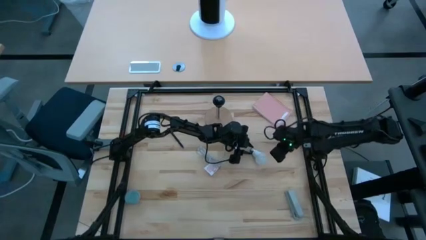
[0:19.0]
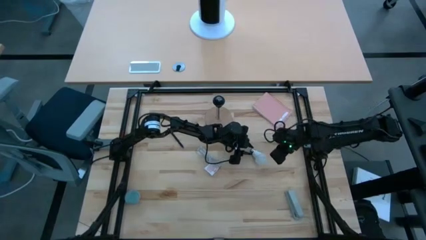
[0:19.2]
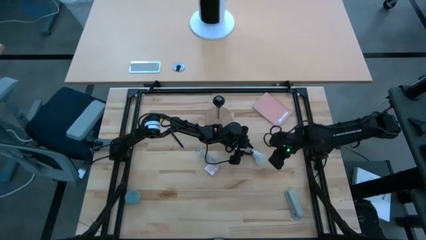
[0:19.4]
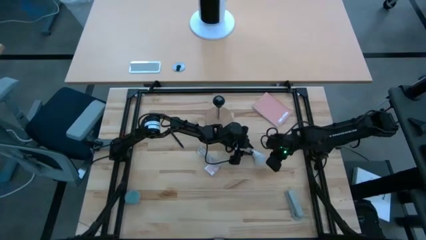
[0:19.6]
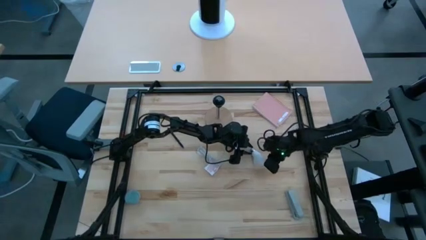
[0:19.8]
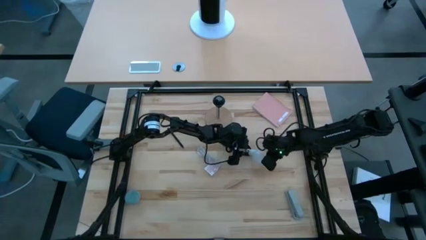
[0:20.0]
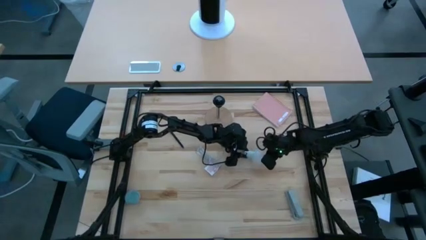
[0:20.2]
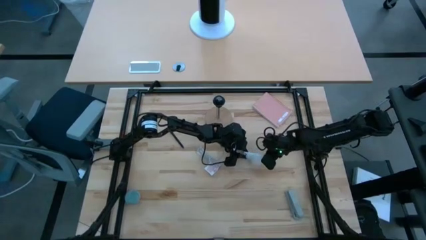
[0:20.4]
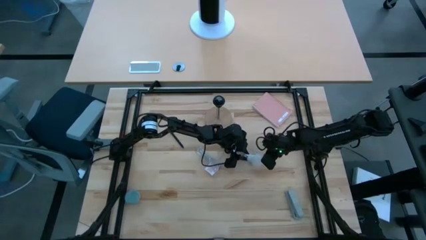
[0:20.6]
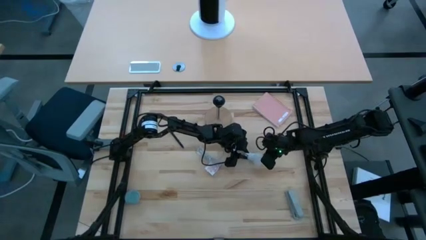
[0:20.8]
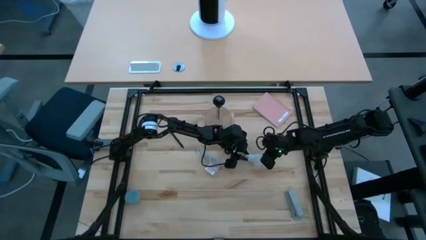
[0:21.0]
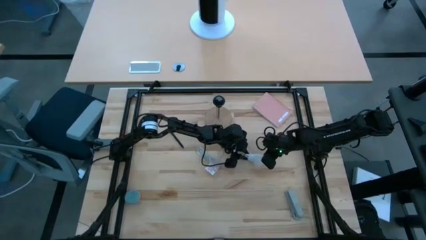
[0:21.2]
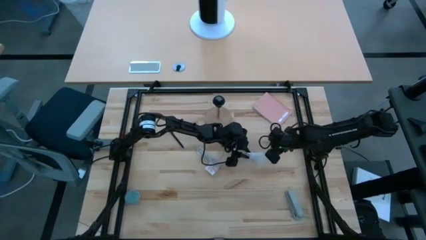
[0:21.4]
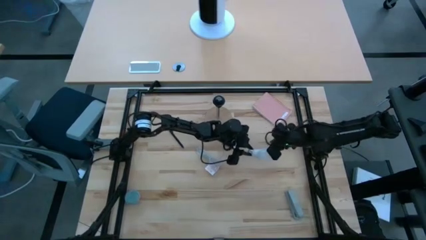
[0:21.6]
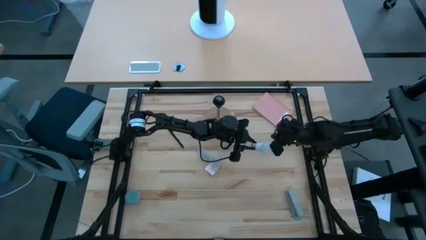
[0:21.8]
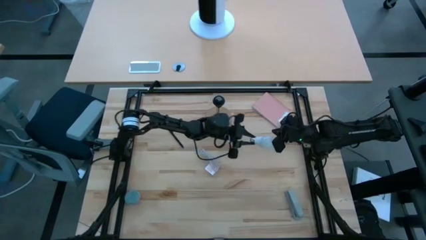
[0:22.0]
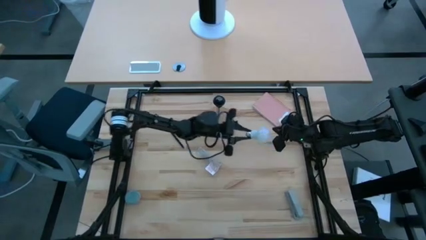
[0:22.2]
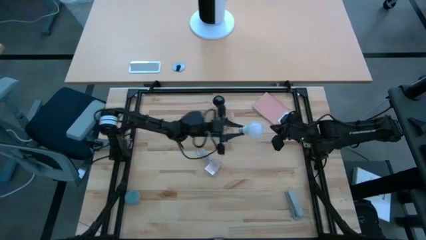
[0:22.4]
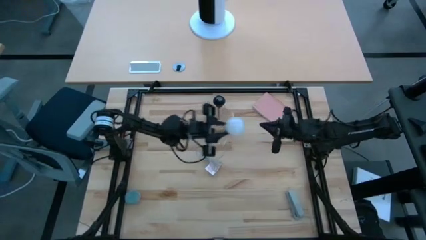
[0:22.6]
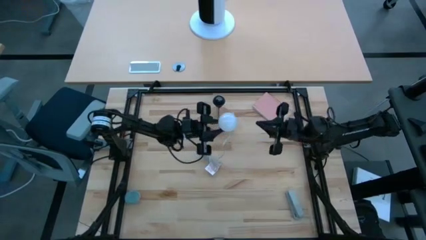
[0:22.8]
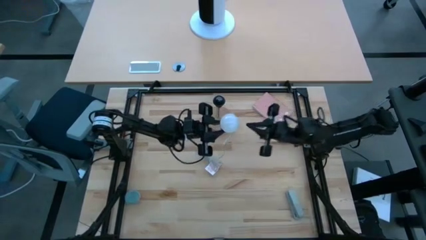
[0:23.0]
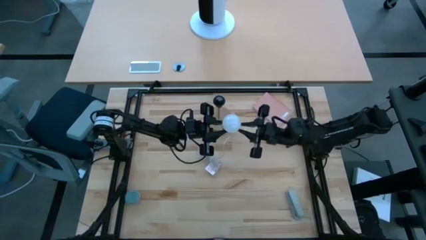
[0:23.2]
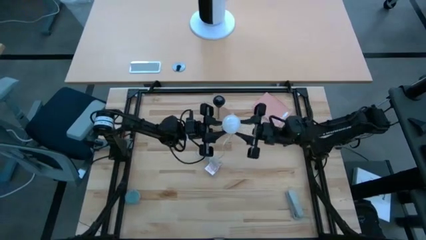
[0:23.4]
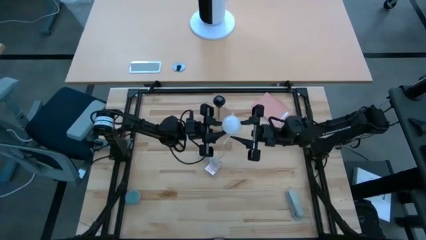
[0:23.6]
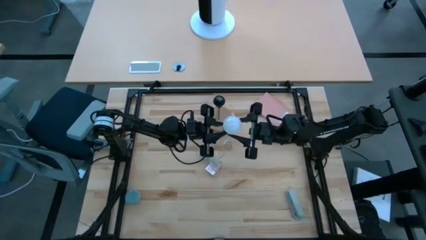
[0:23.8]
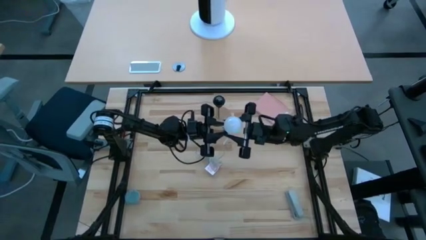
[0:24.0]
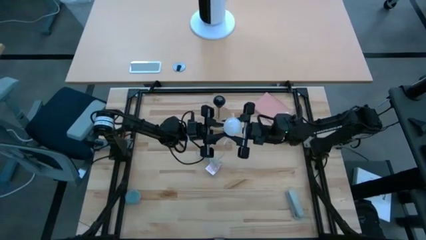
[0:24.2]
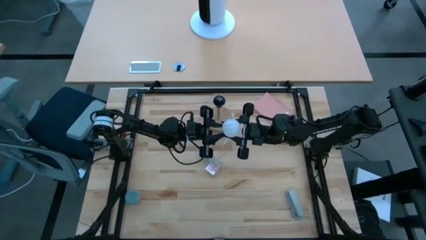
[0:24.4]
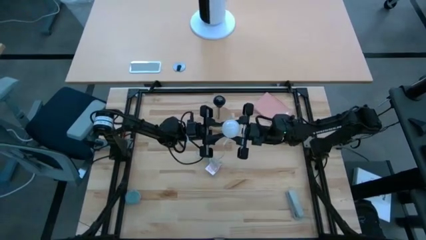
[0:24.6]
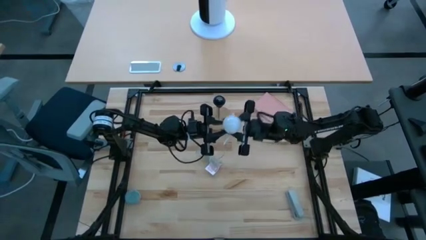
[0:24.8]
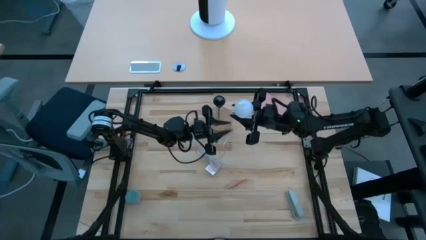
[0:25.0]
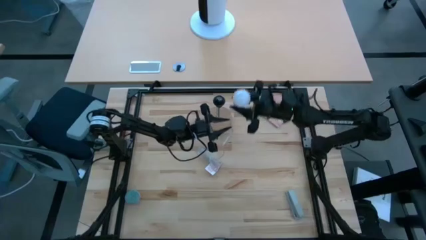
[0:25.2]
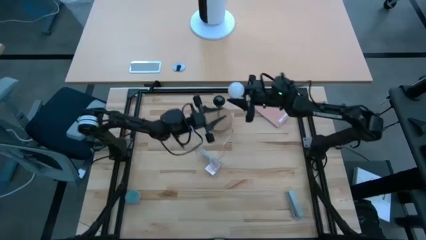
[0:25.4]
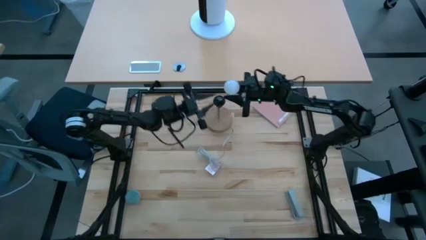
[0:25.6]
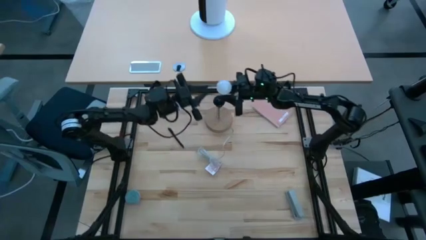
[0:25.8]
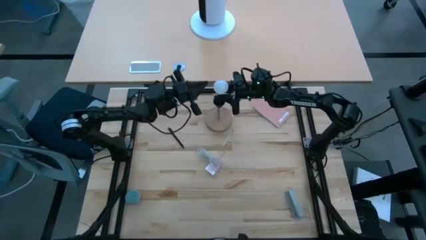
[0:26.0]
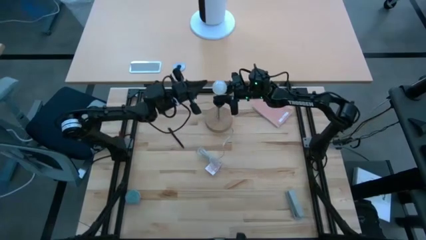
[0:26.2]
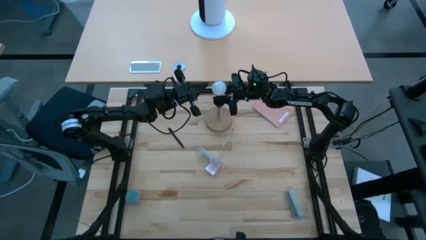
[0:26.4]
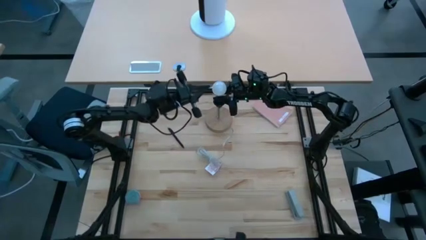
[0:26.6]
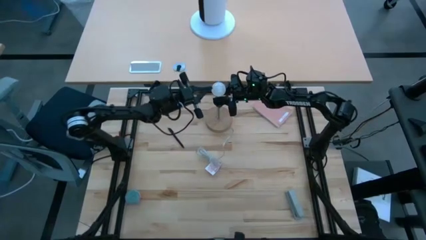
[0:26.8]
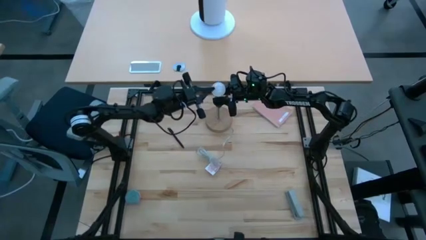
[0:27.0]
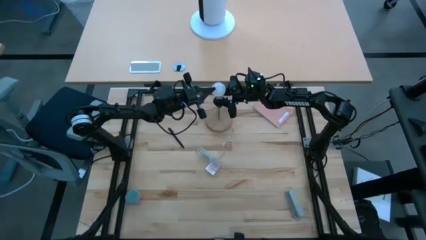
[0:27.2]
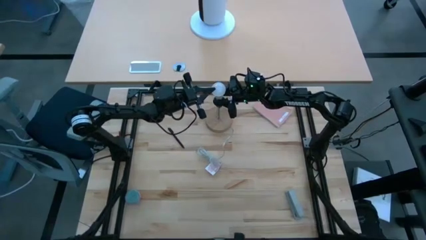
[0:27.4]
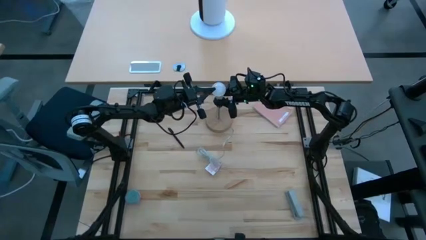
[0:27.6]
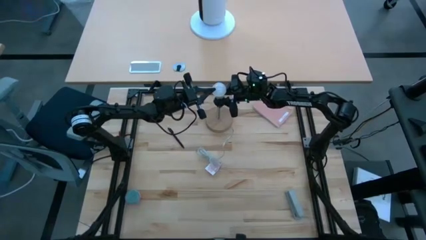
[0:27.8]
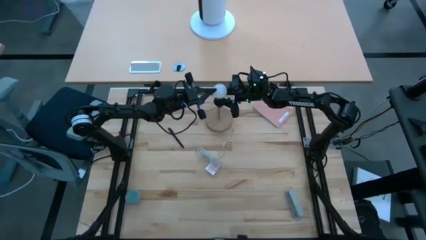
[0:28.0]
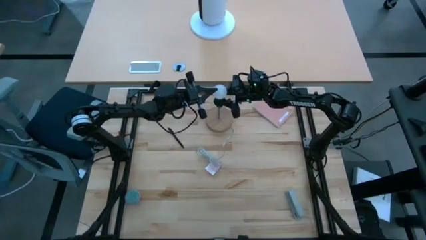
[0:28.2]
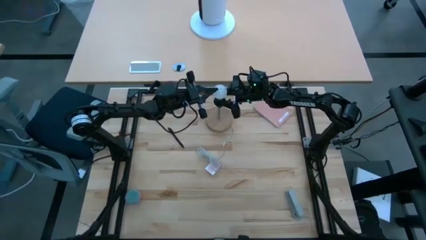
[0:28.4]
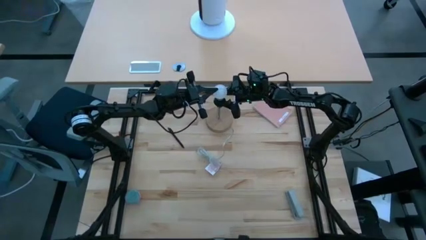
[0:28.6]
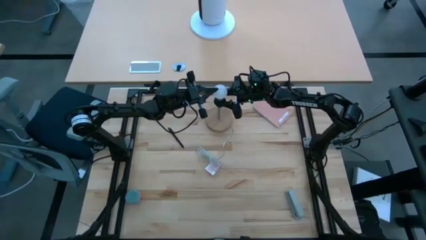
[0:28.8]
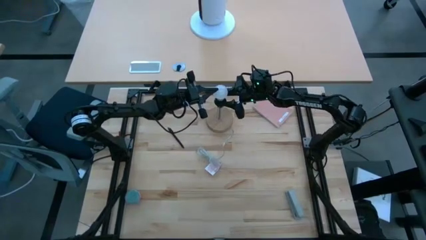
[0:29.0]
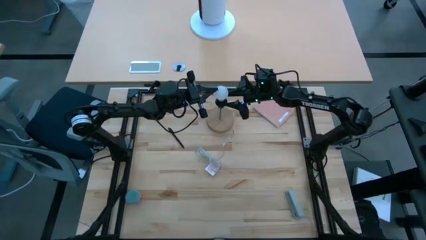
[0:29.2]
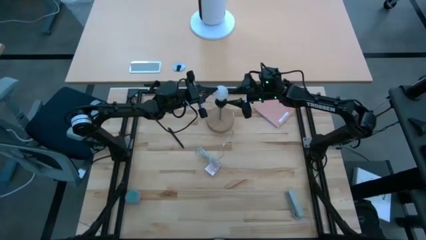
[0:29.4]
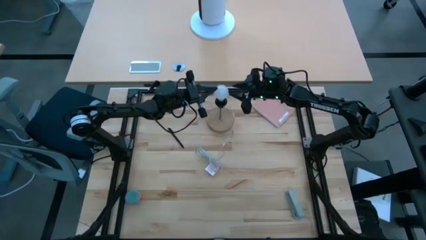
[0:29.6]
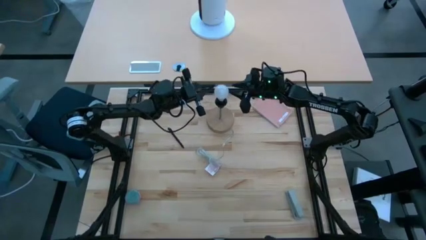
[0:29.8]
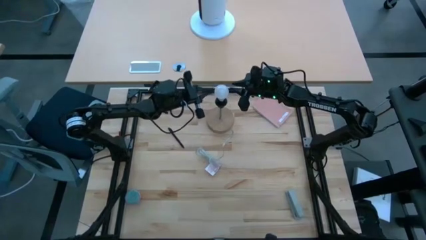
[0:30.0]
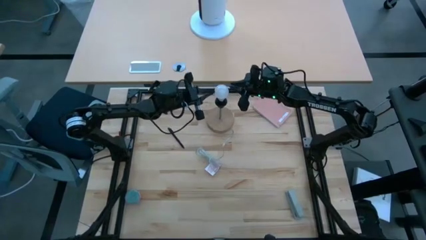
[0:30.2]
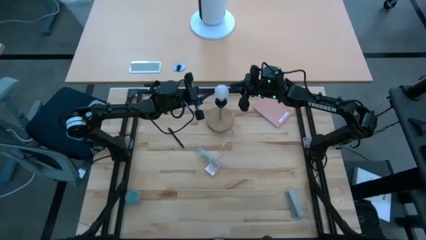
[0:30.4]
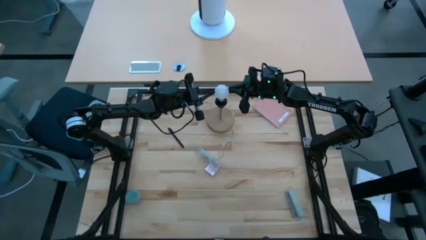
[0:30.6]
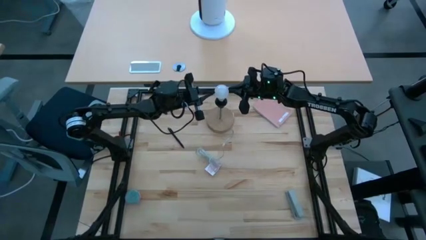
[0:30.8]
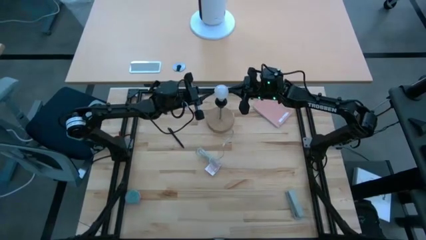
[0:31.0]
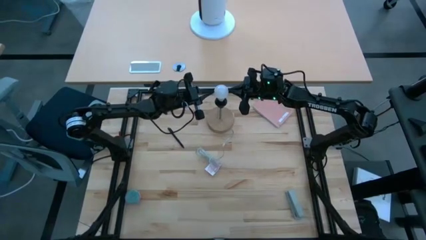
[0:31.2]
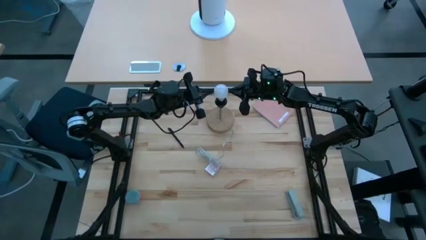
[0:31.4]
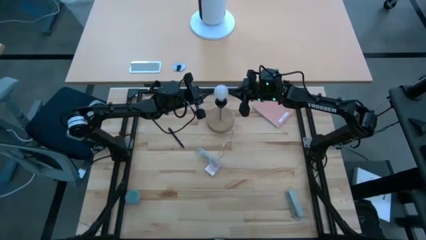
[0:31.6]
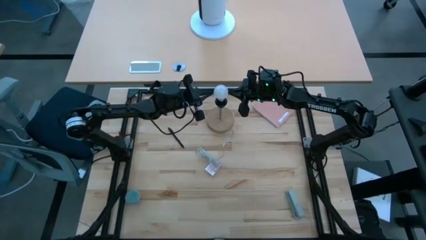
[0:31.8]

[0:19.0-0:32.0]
Task: Screw lightbulb
Insert the lightbulb into the la

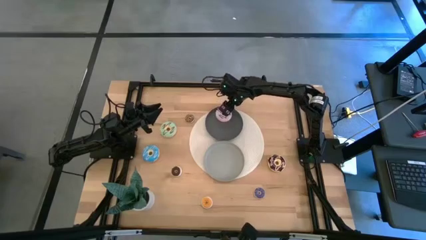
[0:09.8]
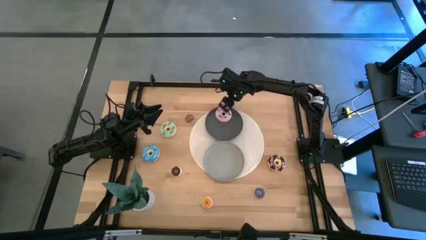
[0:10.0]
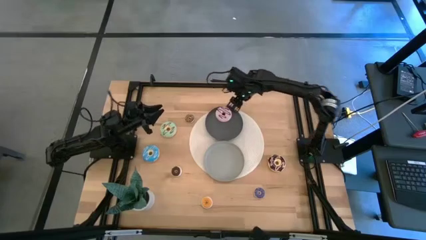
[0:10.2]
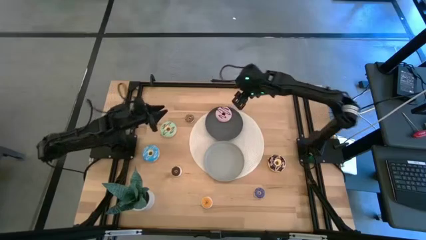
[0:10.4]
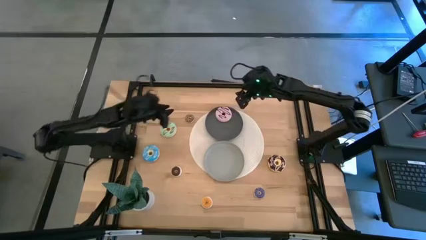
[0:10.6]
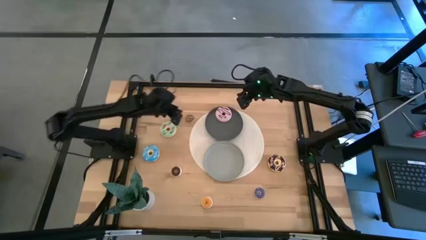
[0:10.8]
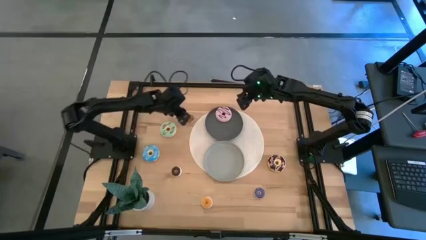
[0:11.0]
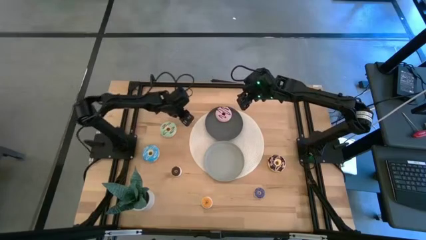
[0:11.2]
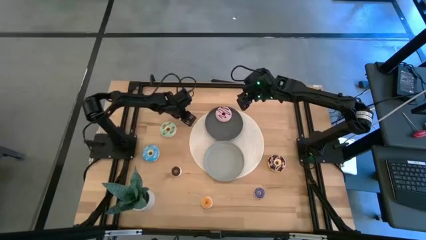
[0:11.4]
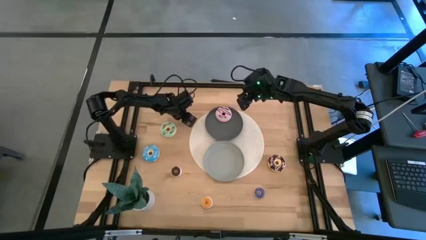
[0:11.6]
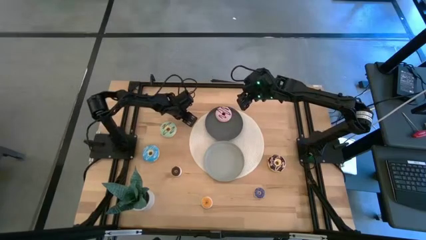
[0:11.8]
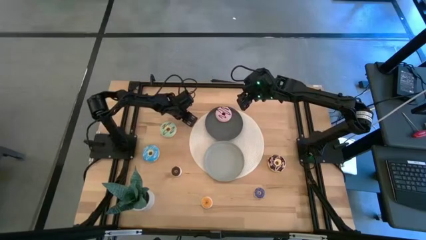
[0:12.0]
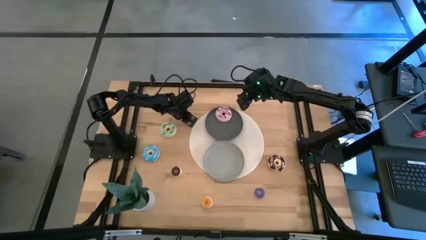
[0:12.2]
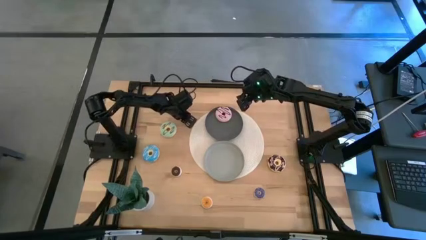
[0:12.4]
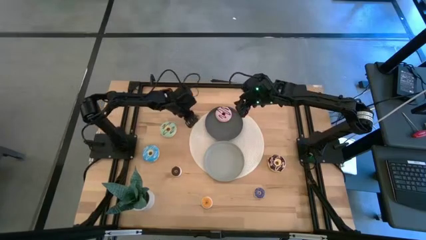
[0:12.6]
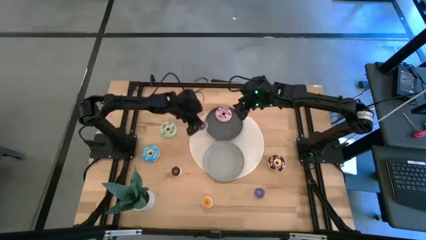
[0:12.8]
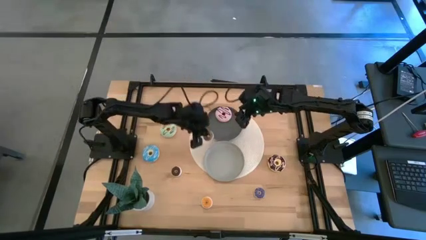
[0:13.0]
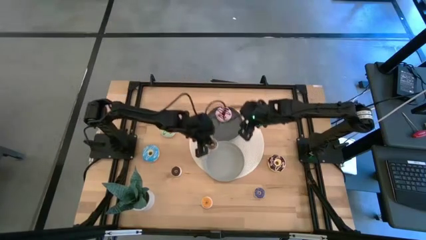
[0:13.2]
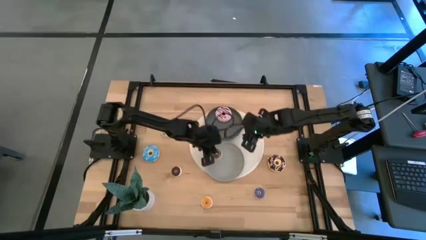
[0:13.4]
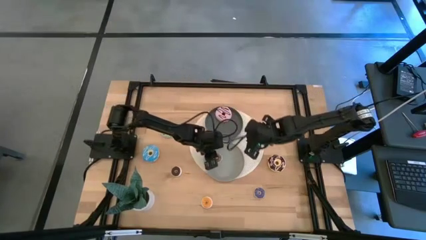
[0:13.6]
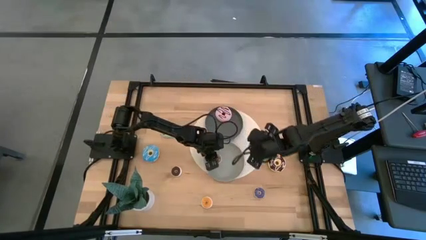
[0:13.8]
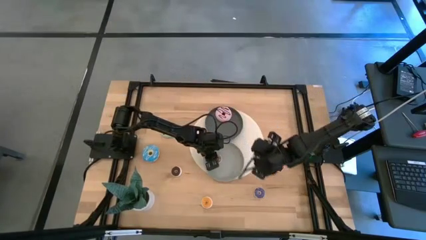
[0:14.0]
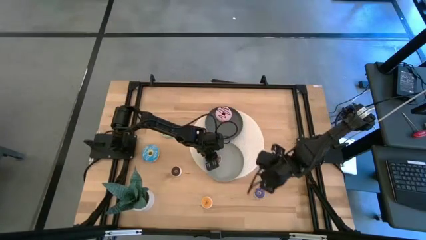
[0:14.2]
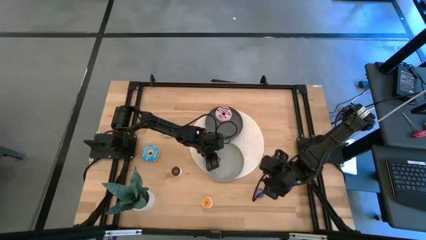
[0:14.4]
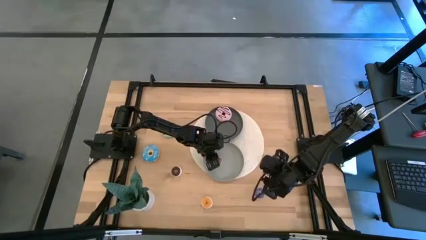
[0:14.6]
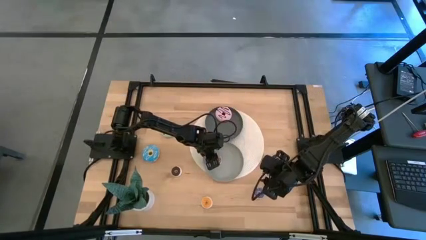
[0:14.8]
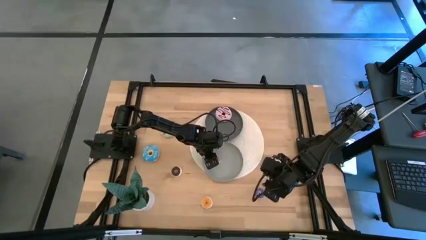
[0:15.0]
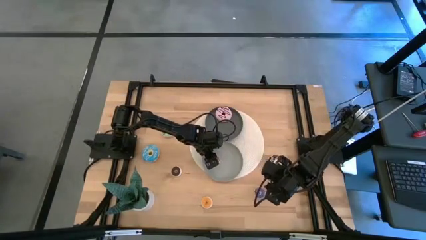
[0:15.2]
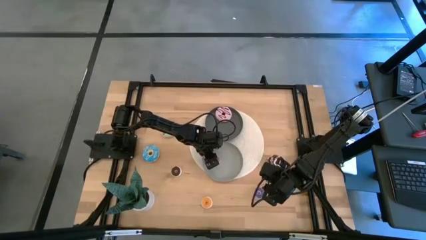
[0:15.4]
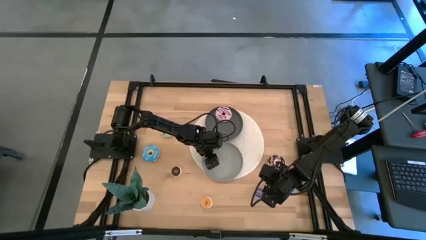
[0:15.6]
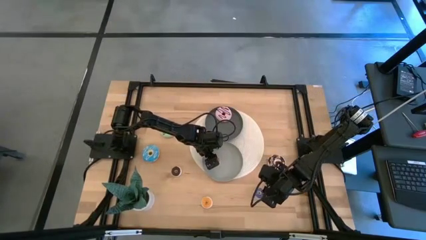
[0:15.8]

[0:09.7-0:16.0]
Task: Pick & Place donuts
Put the small brown donut on the gray plate
